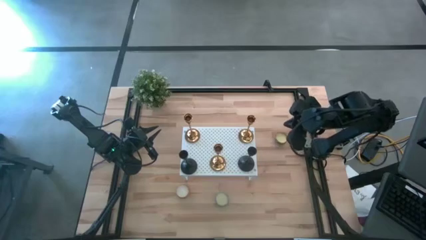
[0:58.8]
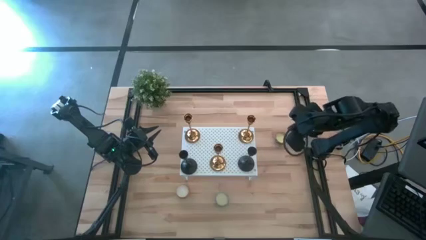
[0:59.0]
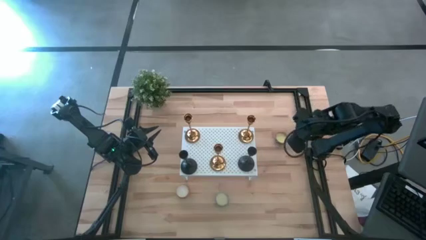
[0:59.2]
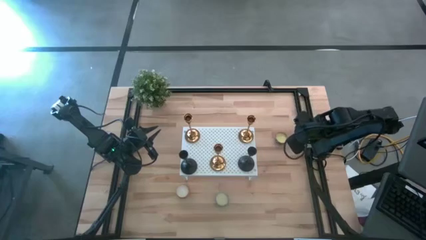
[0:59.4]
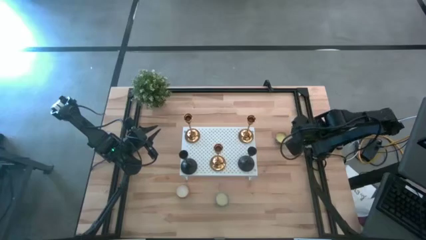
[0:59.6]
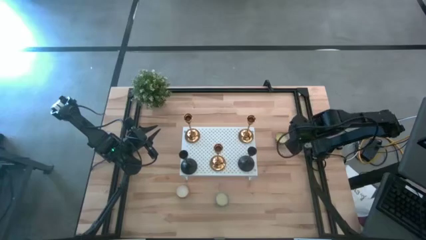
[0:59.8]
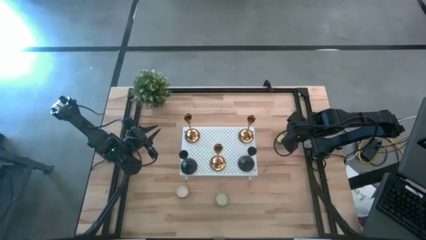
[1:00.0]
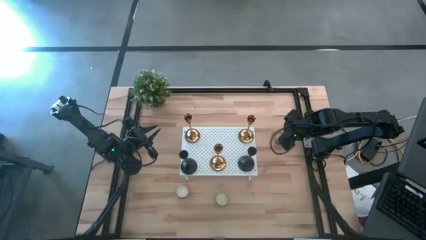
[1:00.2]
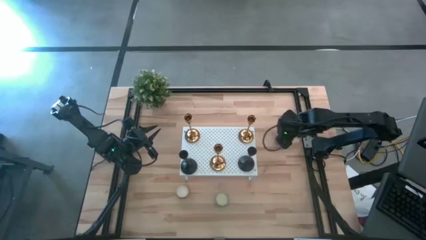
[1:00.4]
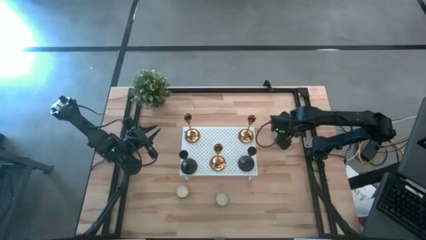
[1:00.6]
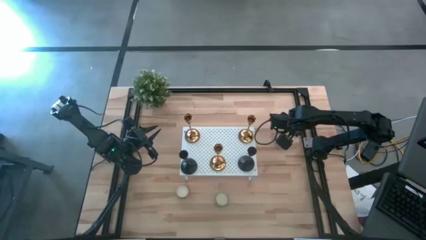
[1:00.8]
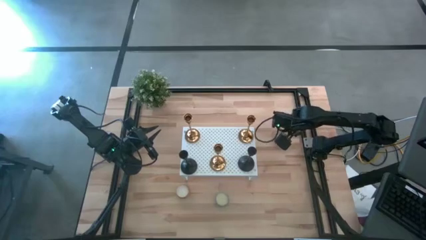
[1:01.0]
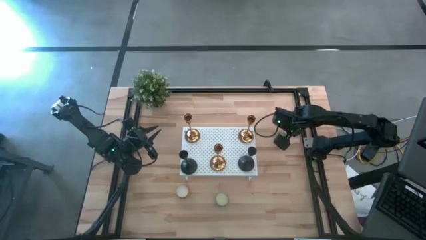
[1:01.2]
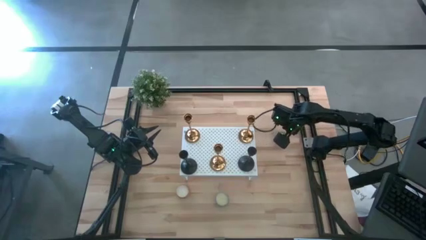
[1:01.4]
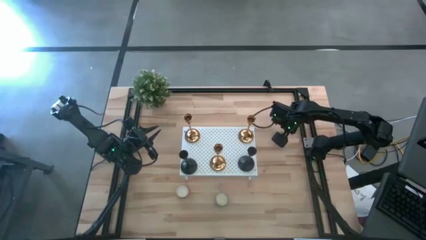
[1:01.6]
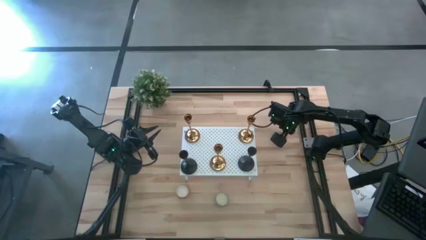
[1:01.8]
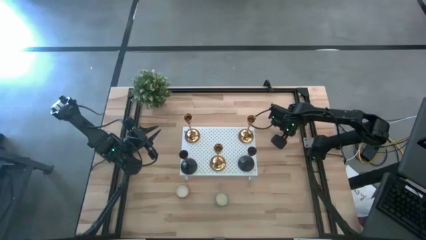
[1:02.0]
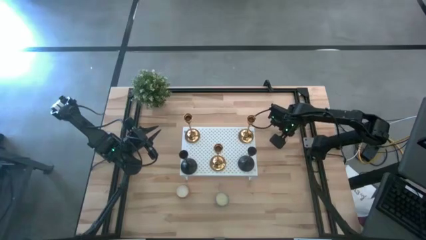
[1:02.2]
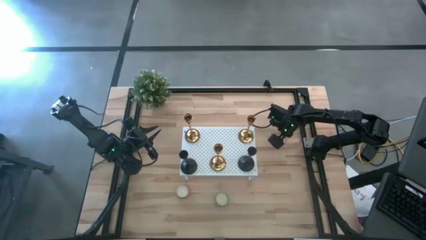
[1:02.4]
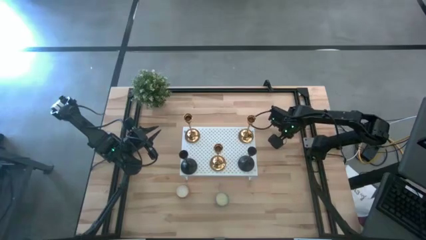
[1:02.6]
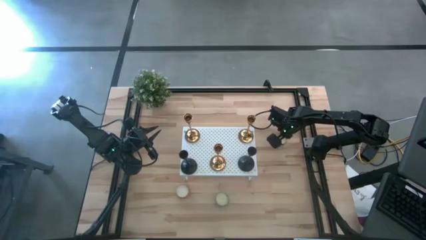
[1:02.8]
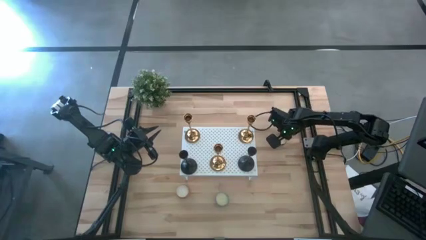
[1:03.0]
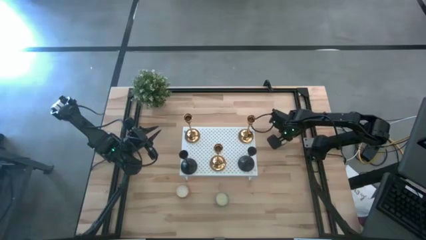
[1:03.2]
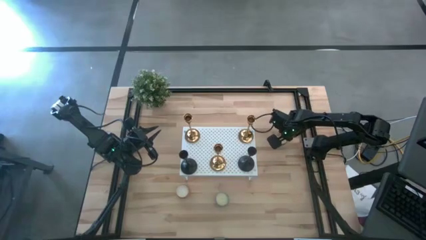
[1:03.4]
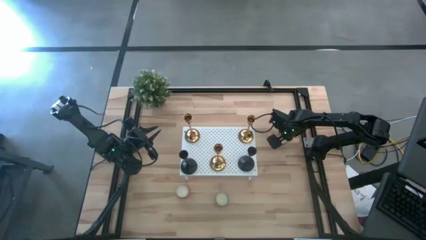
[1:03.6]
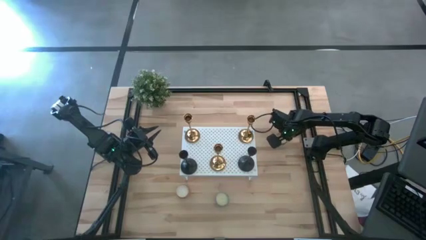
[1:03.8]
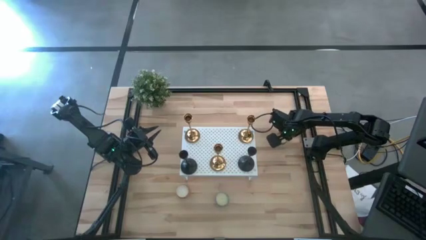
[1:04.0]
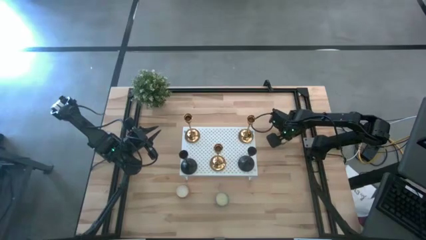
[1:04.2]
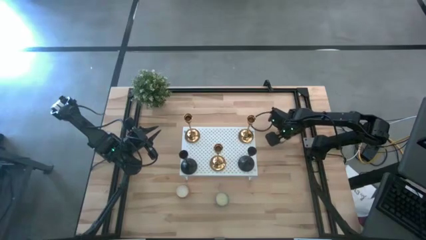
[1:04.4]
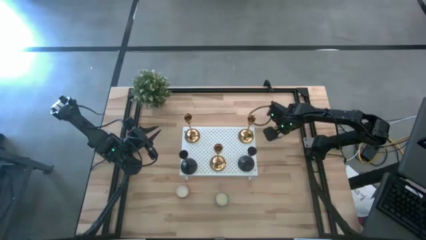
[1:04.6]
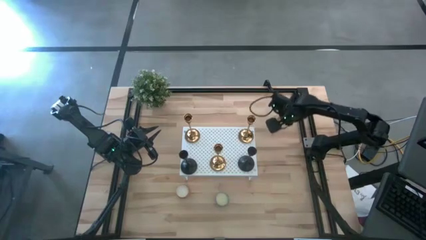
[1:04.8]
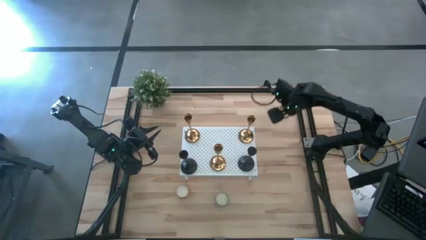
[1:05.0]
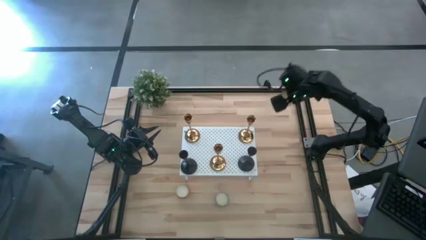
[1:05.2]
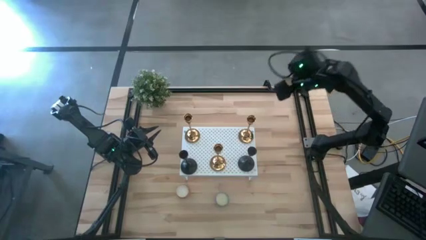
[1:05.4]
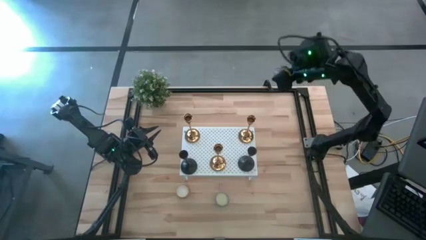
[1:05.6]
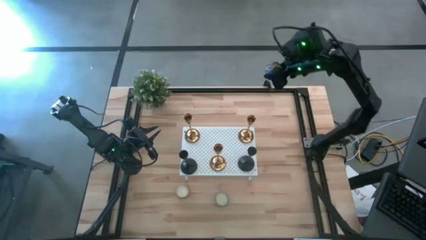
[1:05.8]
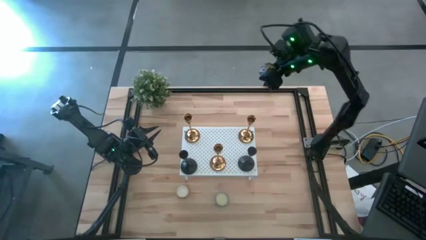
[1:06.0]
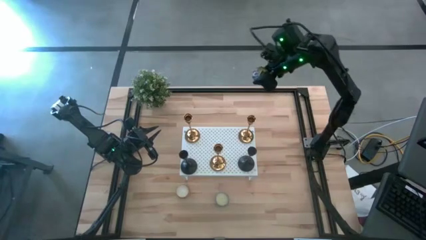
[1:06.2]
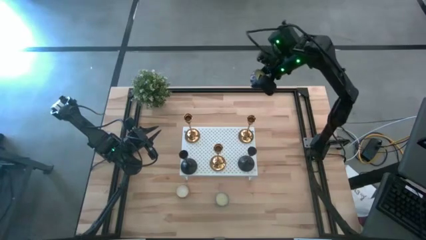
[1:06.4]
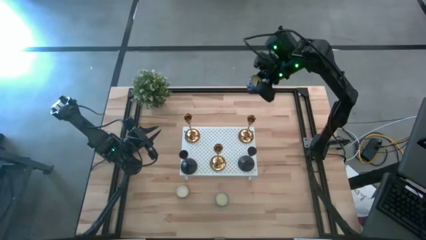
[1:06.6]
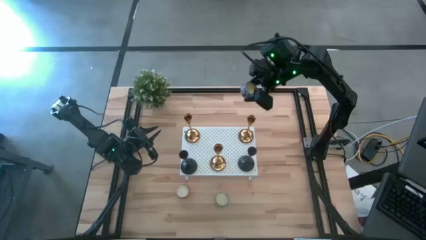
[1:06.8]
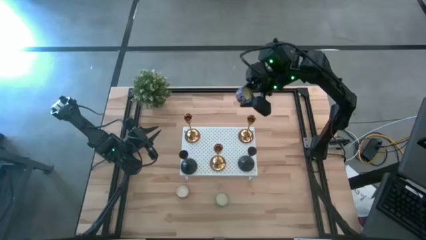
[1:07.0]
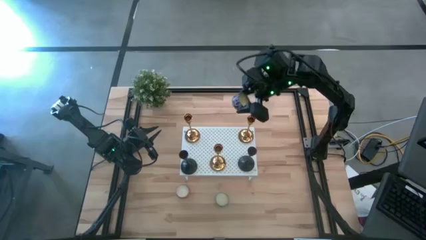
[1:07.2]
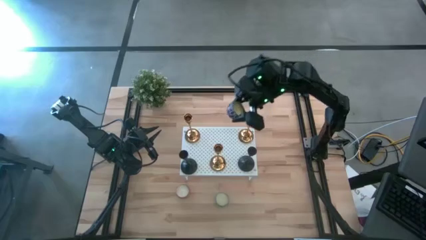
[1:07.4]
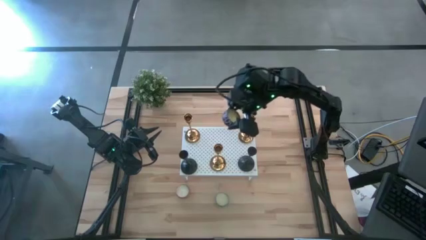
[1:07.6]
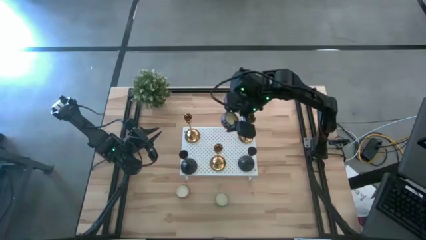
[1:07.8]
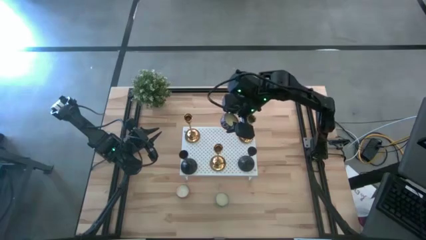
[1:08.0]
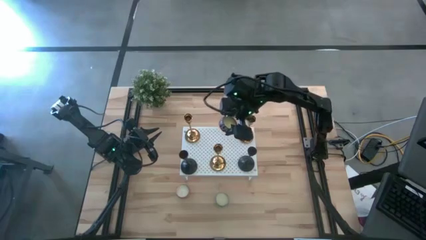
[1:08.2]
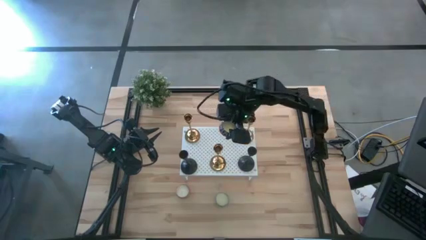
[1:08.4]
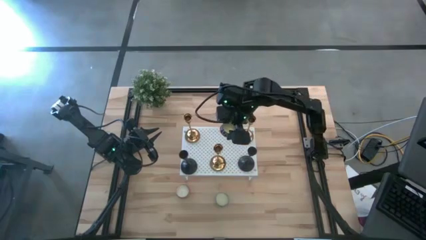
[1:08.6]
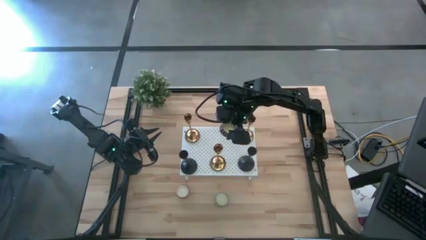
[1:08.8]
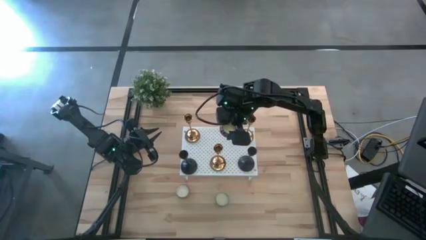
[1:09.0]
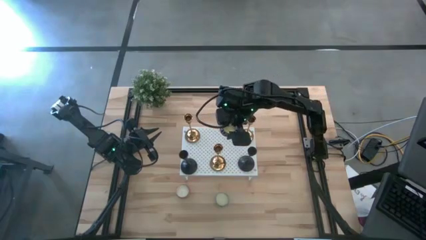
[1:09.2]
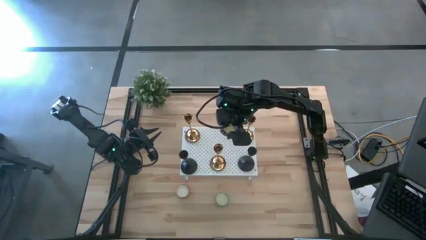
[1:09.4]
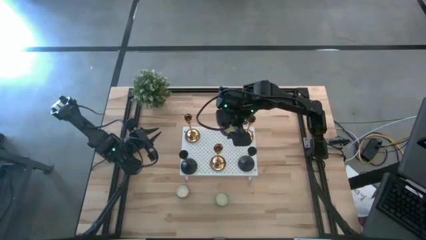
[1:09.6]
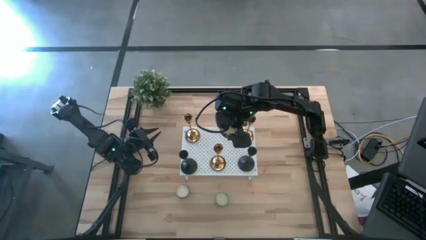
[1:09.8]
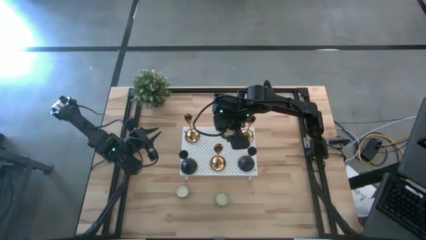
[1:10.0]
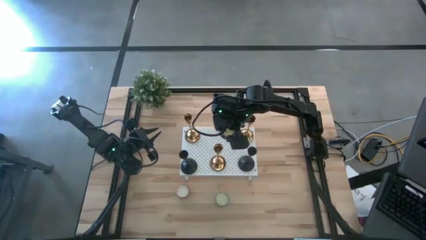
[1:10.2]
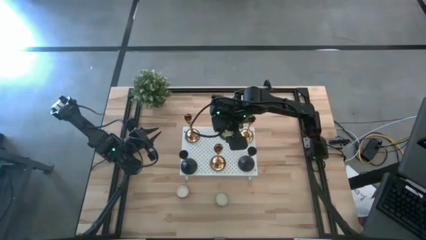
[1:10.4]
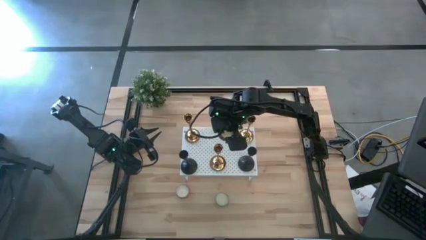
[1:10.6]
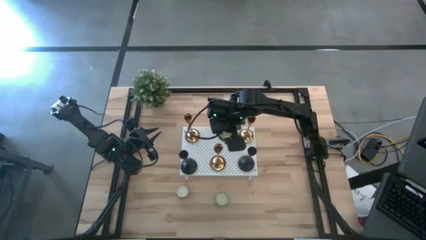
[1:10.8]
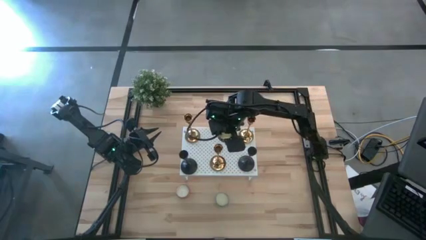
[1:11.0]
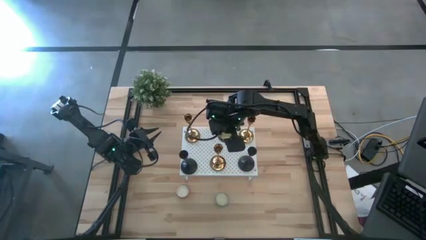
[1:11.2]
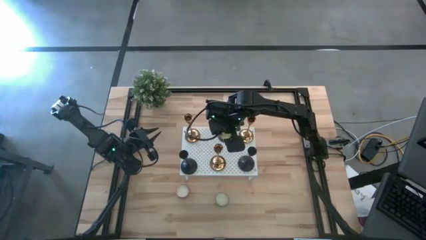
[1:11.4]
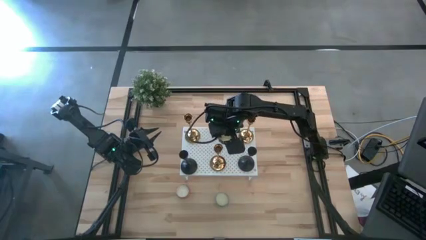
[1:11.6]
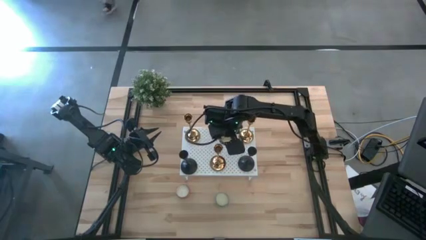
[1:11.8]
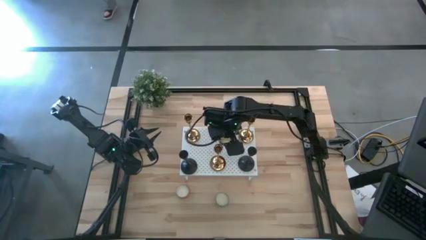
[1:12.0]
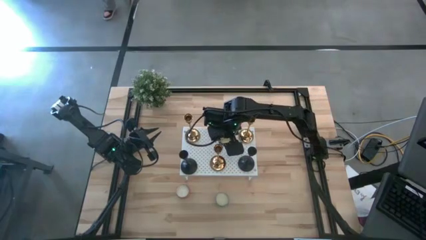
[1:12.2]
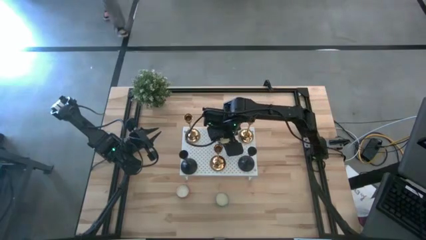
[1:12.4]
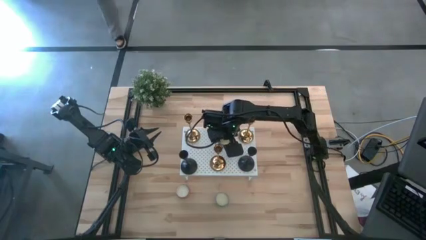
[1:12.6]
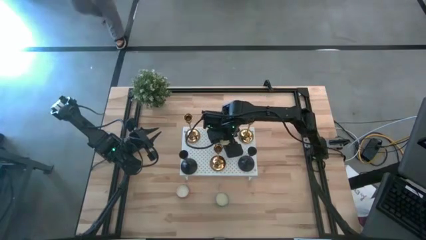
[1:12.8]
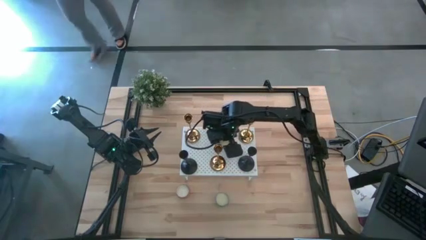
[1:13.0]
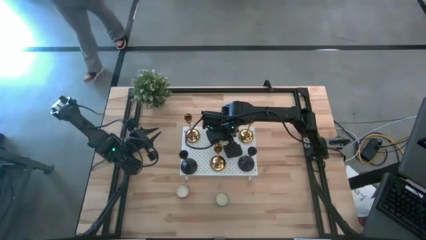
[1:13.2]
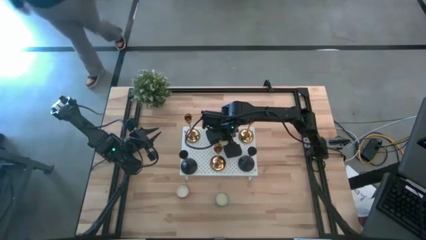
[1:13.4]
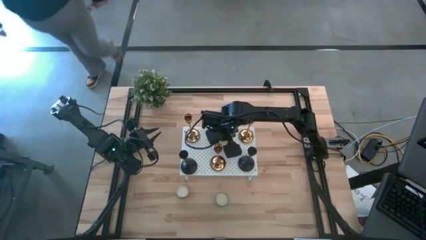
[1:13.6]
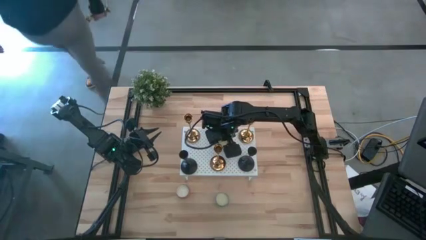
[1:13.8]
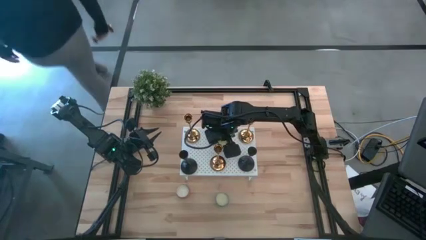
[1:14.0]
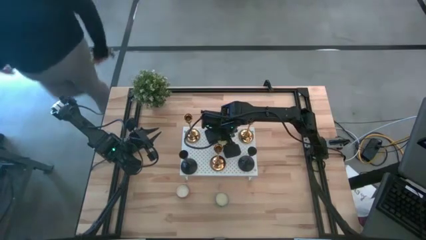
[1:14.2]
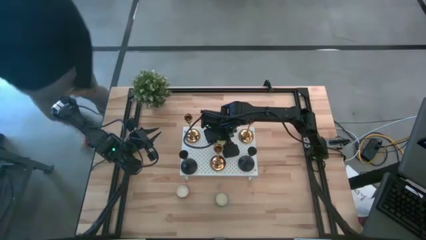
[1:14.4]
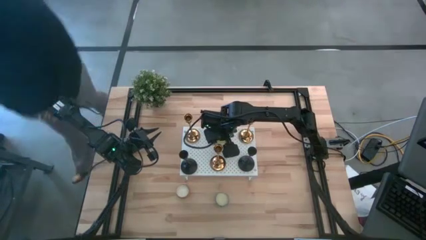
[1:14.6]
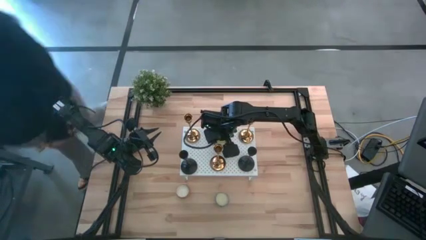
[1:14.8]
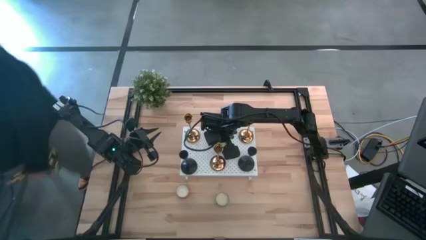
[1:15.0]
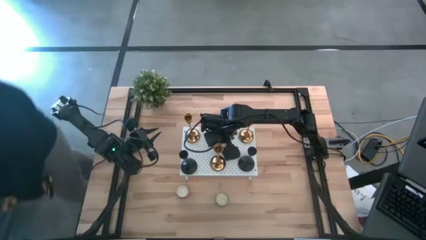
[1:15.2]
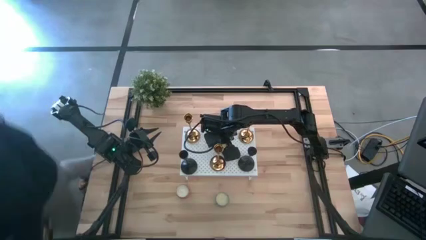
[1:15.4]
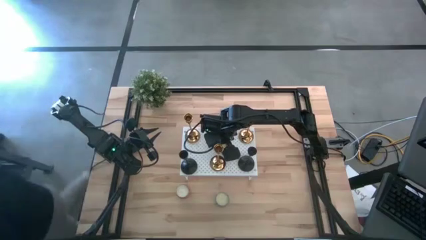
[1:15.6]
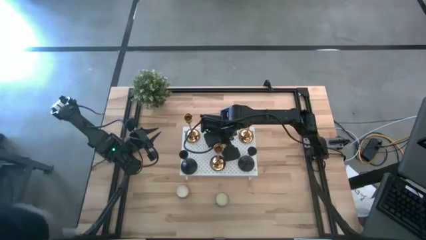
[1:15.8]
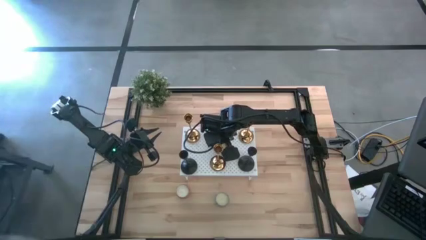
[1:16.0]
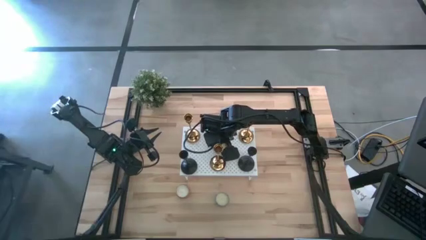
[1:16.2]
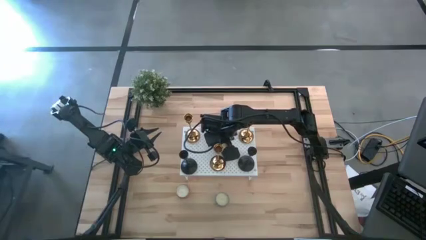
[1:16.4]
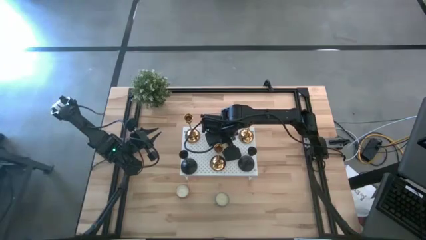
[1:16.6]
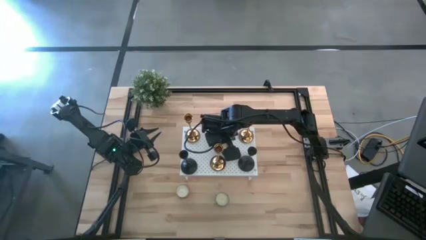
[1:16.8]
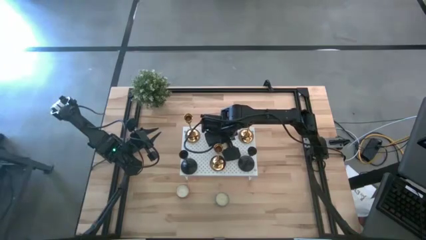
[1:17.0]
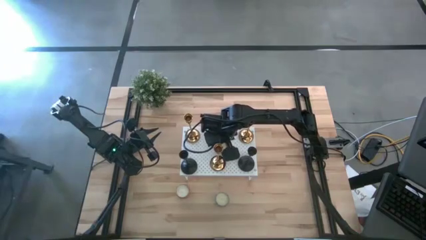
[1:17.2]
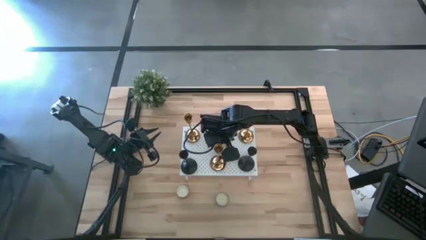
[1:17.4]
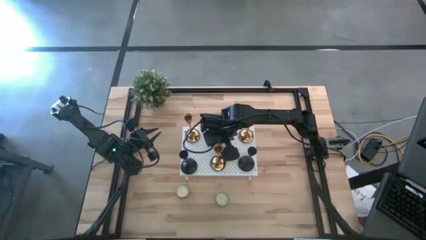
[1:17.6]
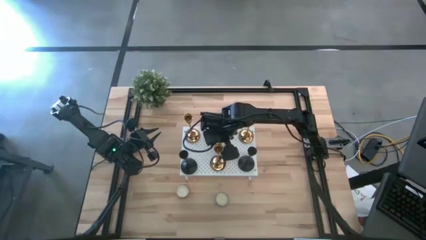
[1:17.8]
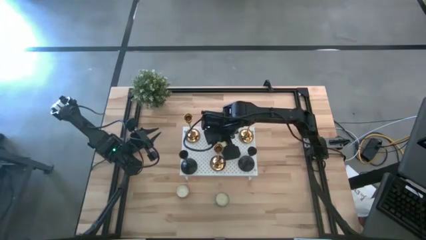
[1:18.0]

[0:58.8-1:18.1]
Task: Pick & Place candle stick holders
Put the right scented candle on the shelf
